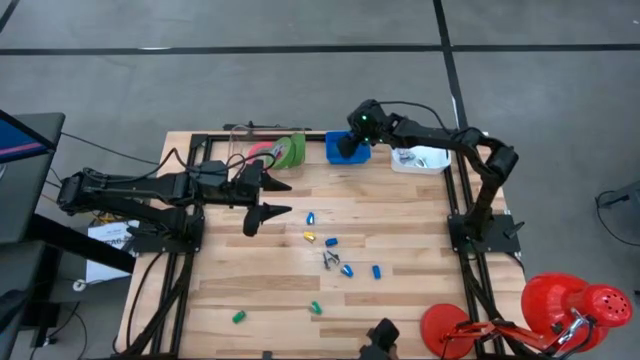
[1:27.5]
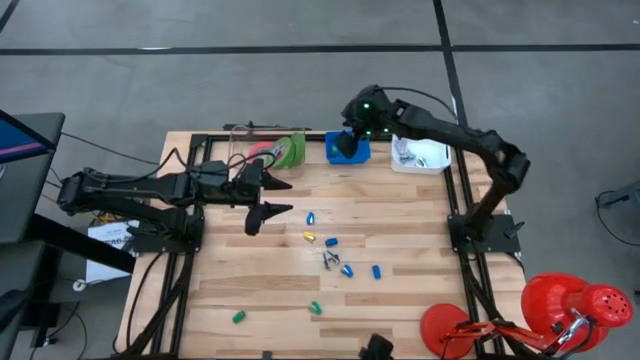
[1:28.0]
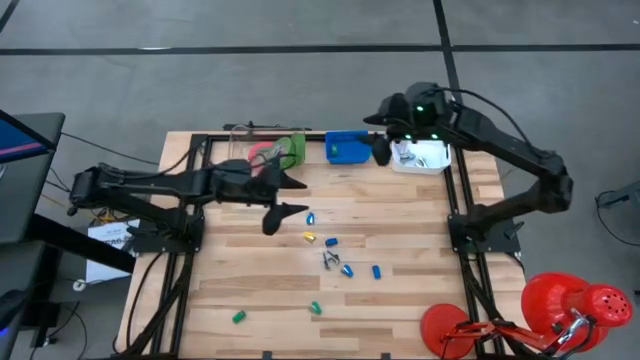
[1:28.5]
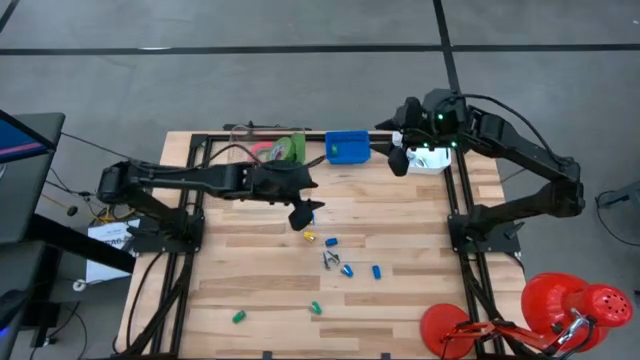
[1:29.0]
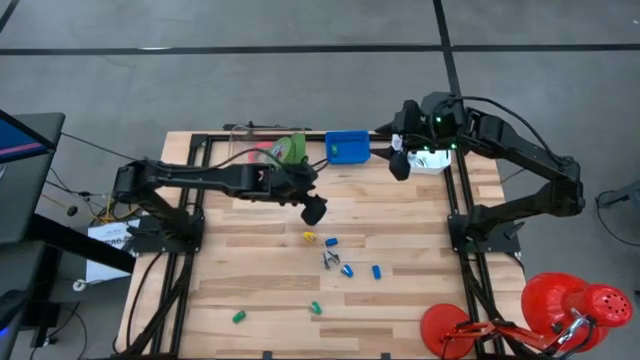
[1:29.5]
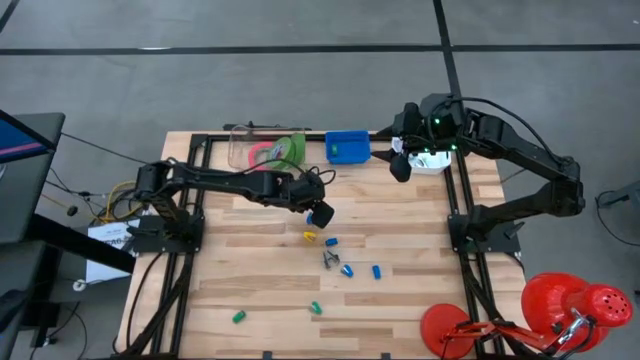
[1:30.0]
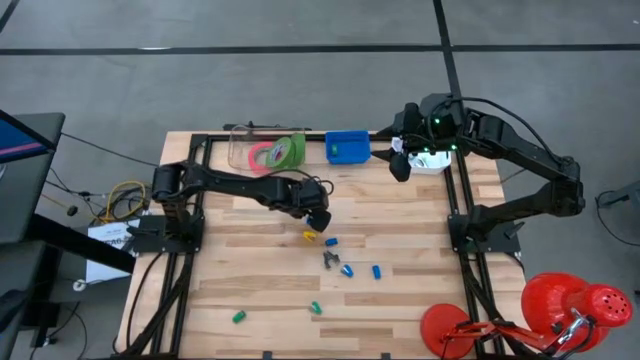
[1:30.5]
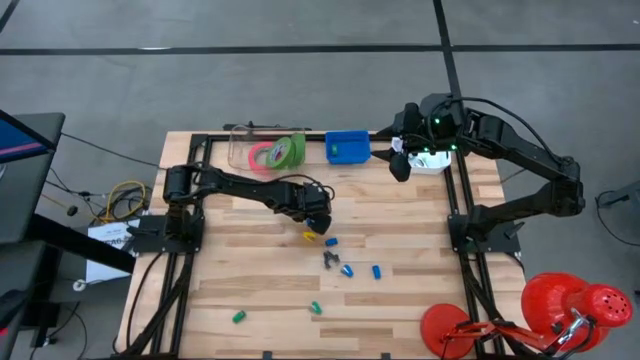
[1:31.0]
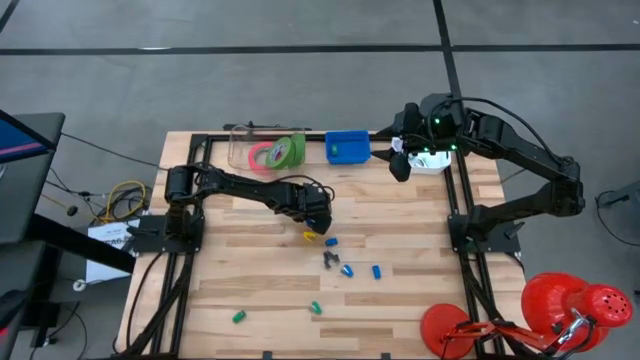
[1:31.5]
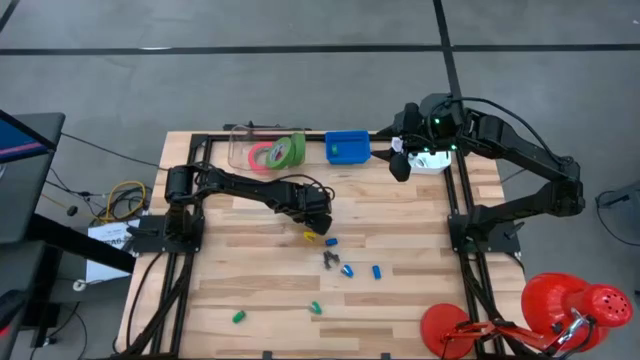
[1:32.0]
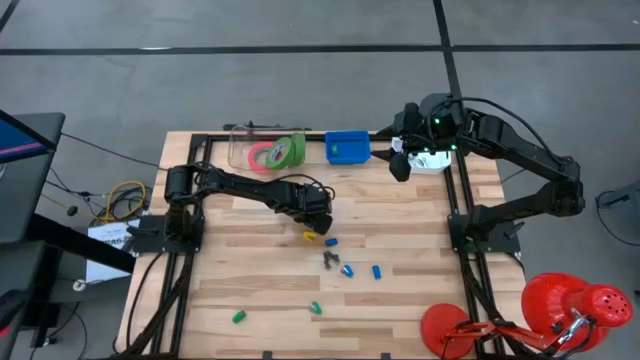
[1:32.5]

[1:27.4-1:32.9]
Task: Pick and place Stapler, Stapler remover, tape
Put the blue stapler into the blue bin

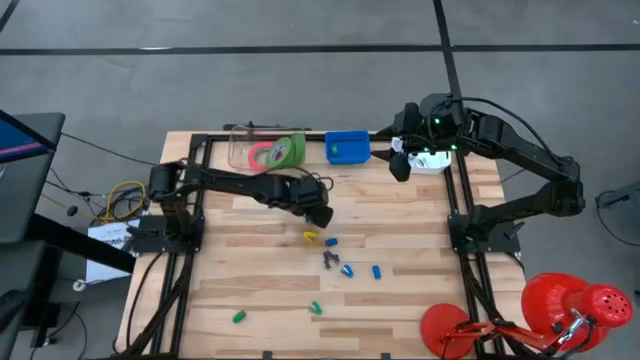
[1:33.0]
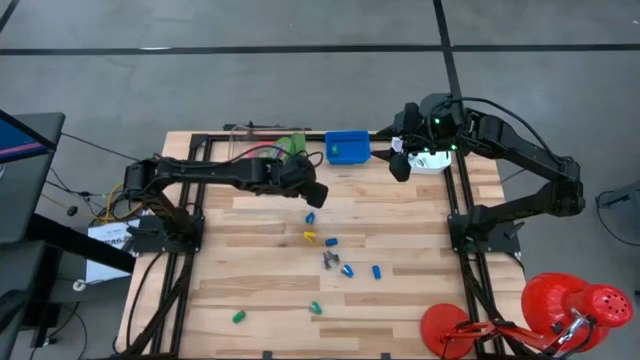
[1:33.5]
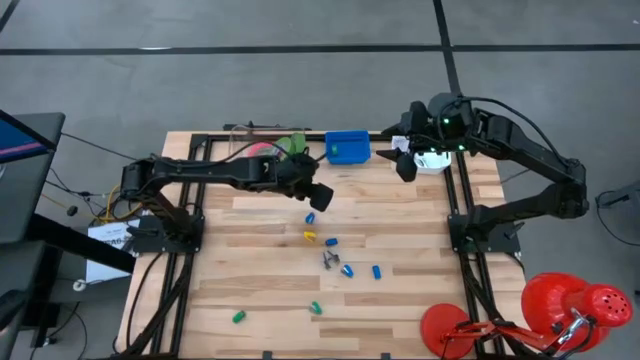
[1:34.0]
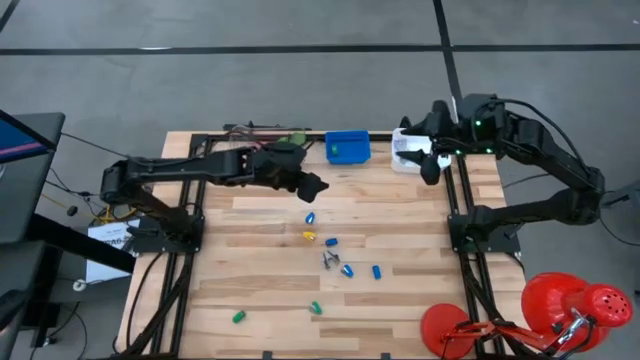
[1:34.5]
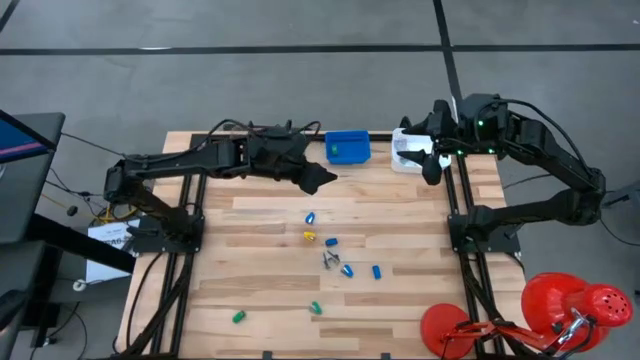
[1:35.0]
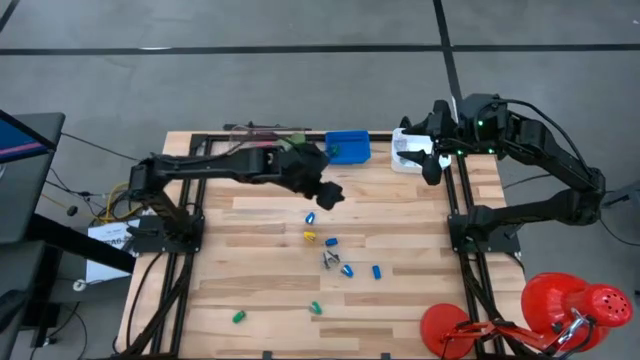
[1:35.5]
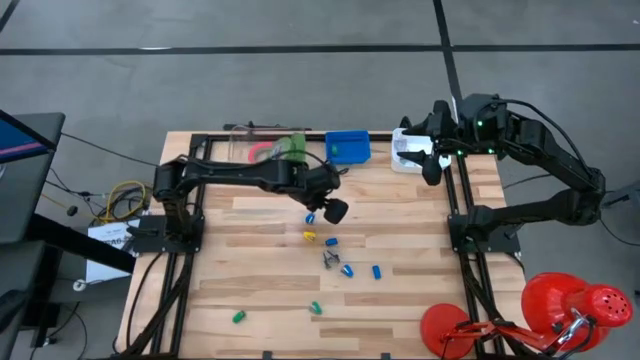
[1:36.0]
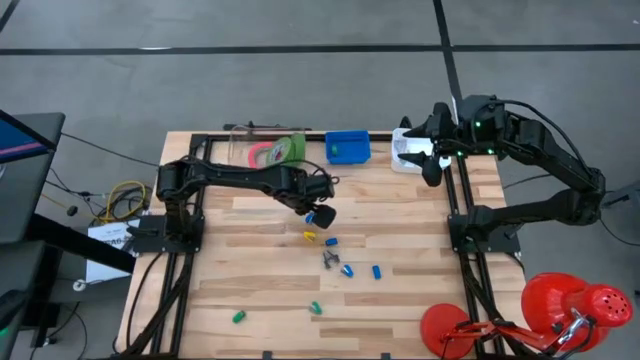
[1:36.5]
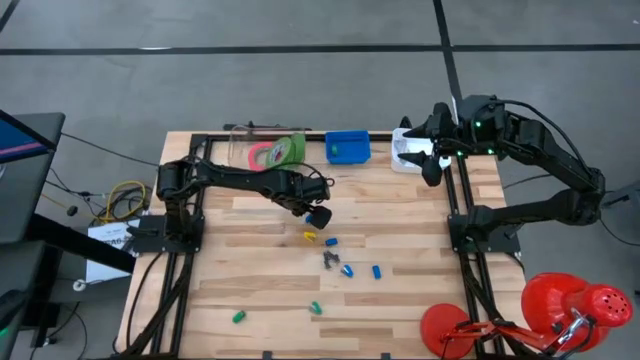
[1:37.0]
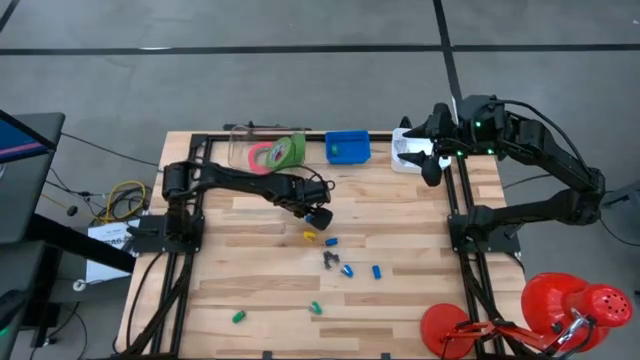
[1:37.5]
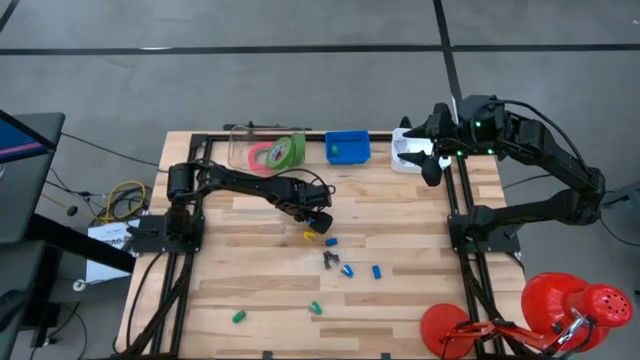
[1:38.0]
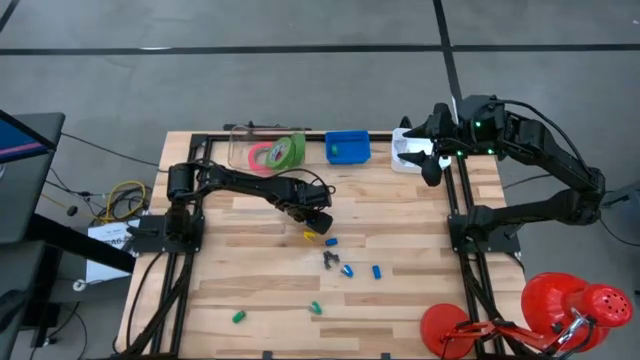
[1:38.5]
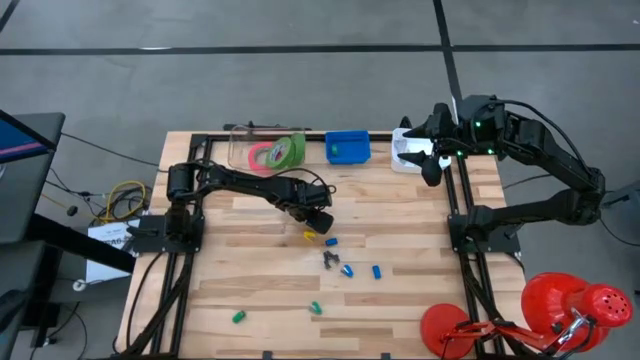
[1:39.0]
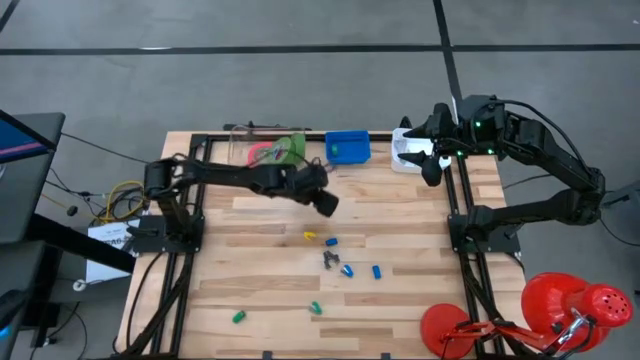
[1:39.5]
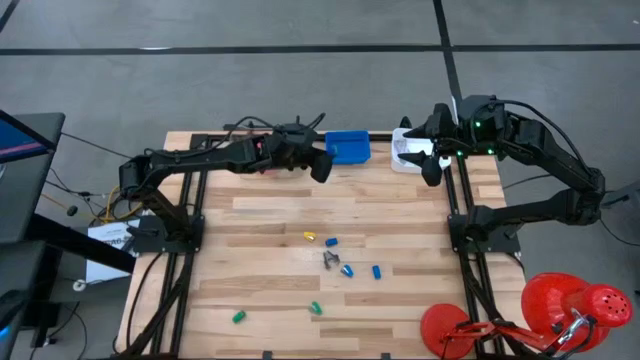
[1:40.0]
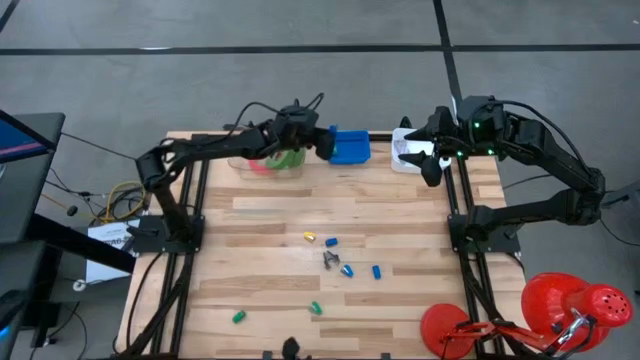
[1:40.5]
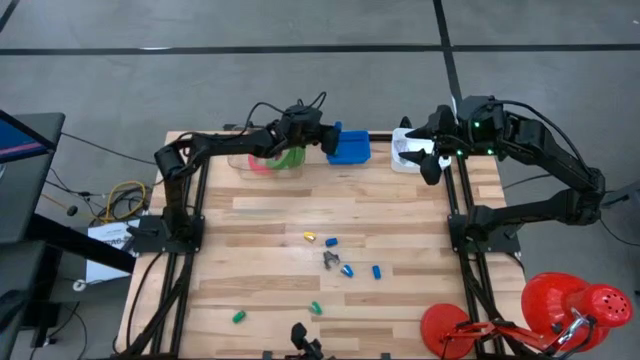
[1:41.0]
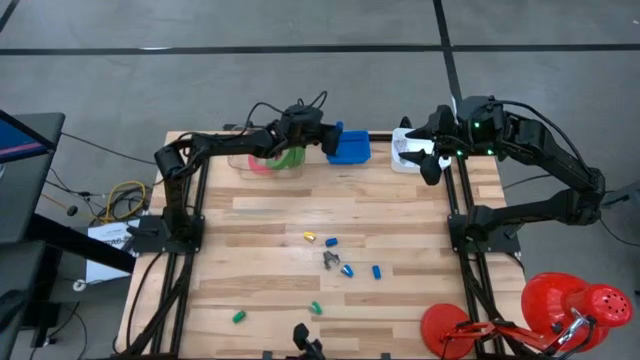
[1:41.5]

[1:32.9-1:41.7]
Put the blue stapler into the blue bin

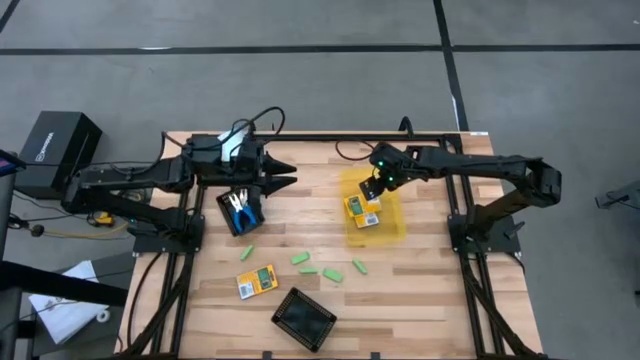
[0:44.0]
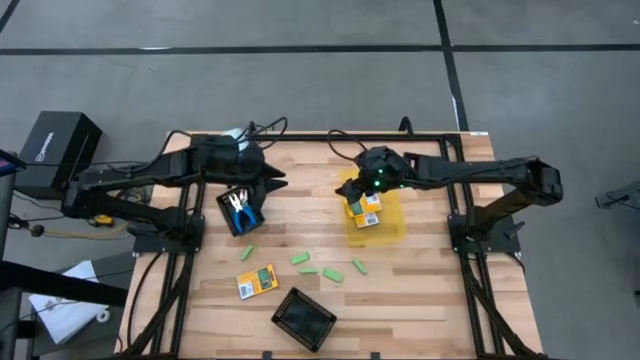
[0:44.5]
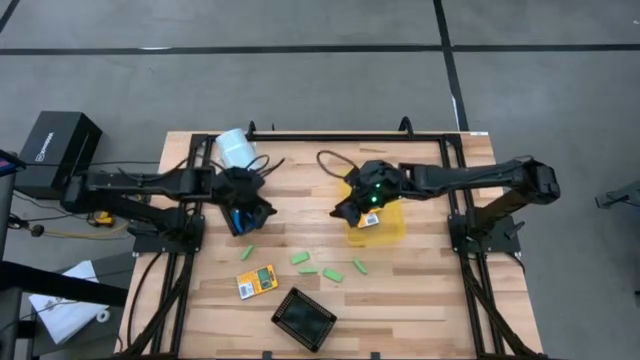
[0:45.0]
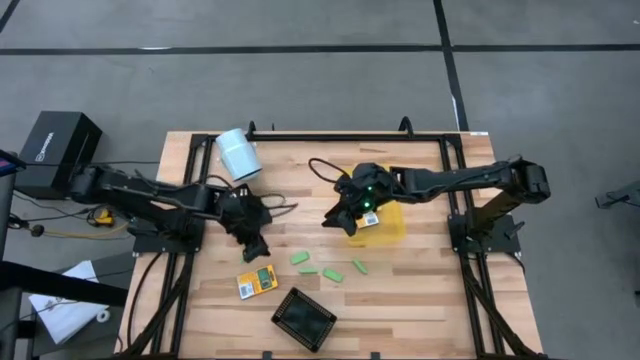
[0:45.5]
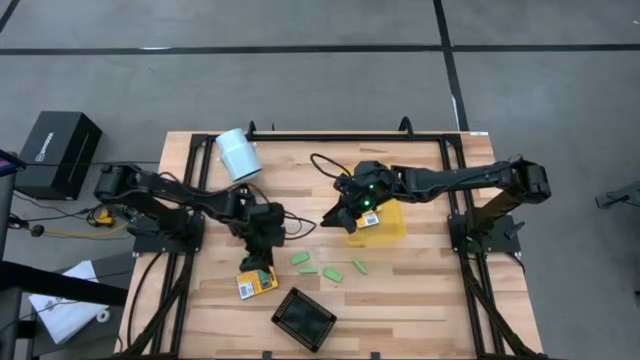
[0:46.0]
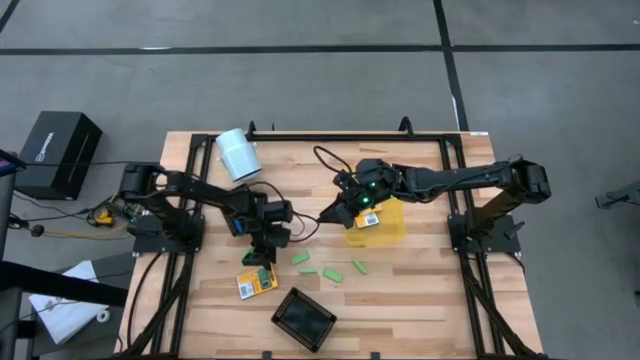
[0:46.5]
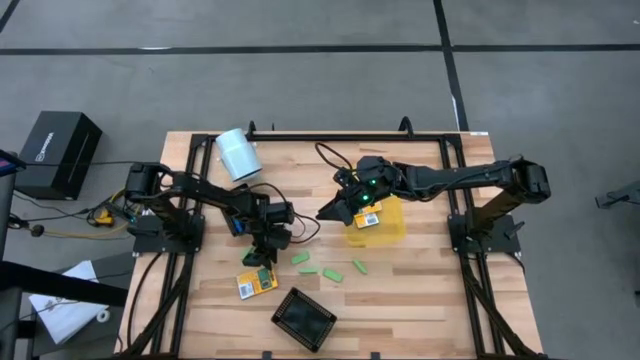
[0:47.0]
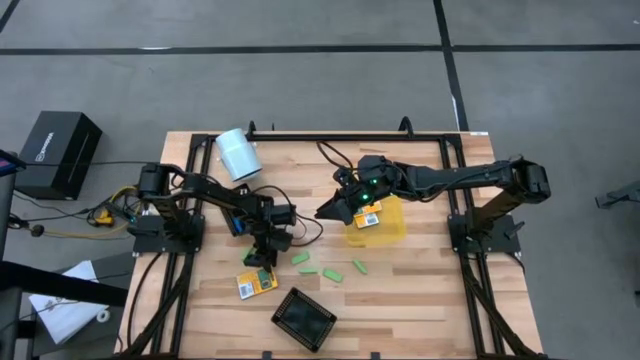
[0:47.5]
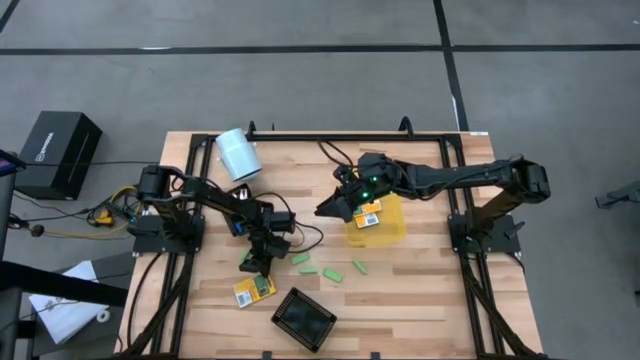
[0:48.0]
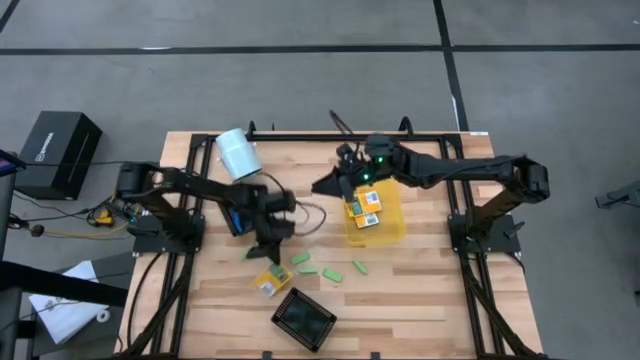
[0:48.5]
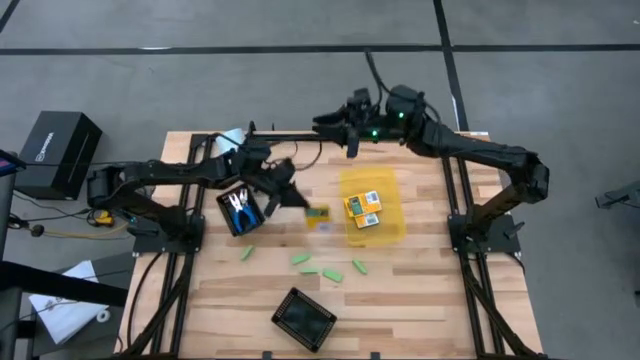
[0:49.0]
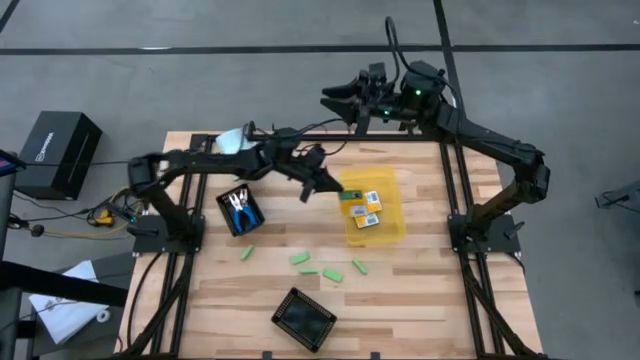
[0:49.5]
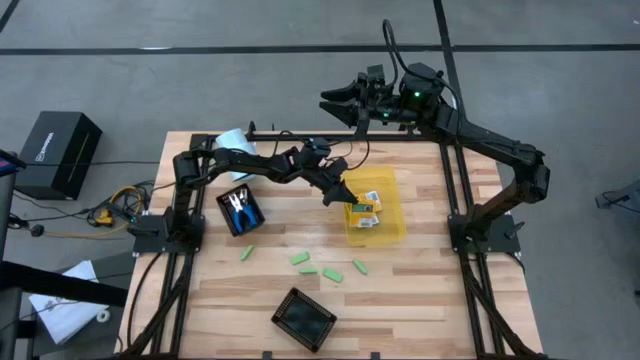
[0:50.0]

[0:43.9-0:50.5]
Task: Pick & Place School Supplies
Put the crayon box into the yellow bin
